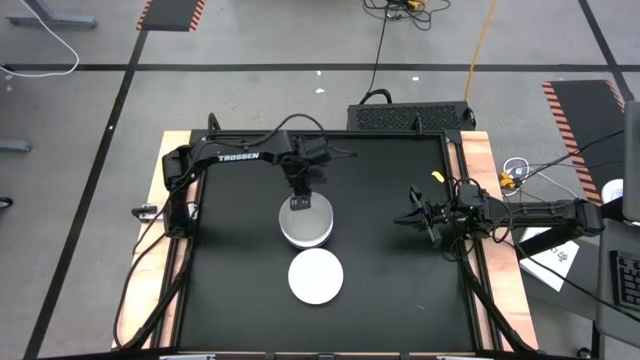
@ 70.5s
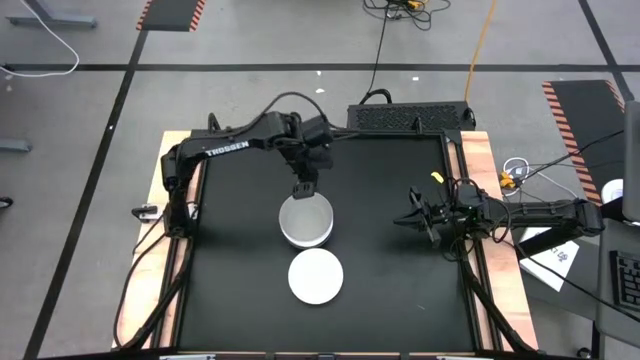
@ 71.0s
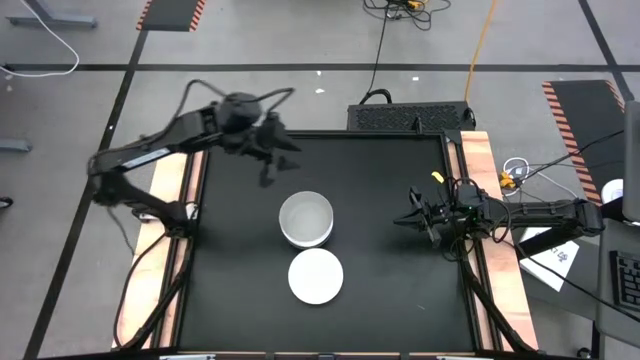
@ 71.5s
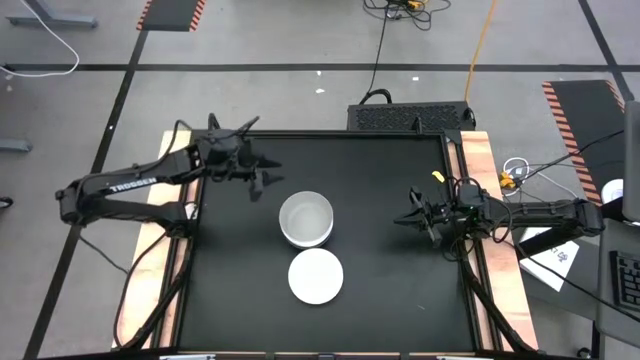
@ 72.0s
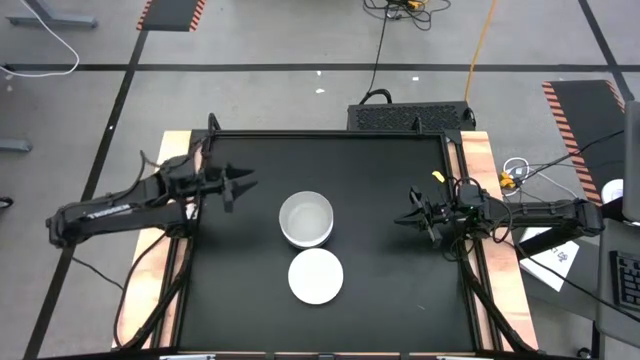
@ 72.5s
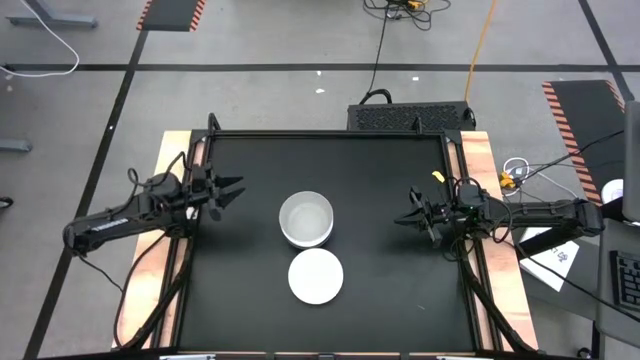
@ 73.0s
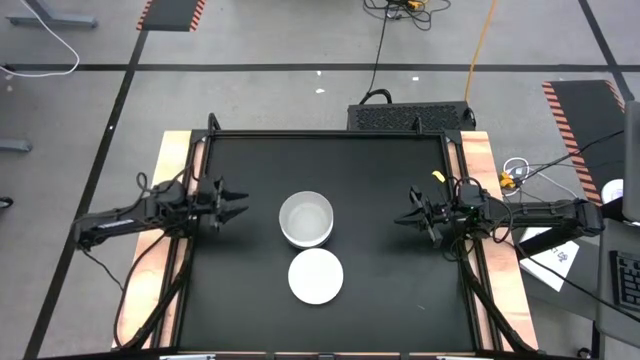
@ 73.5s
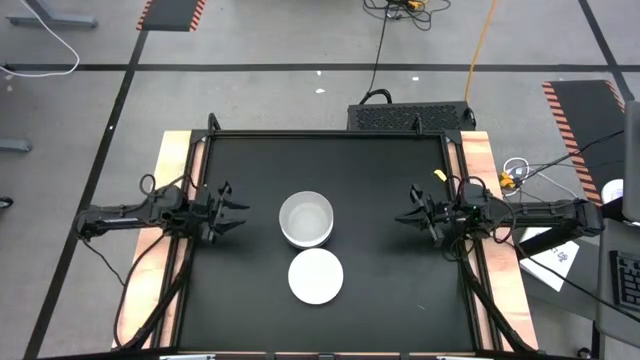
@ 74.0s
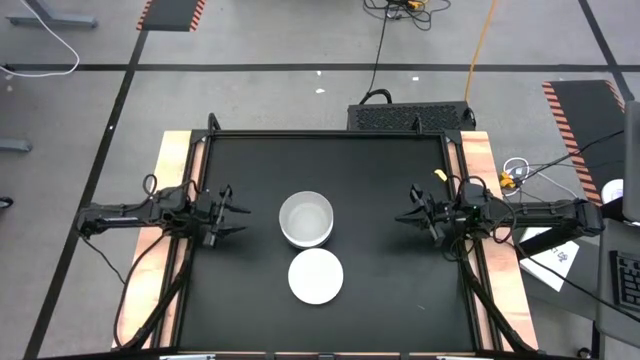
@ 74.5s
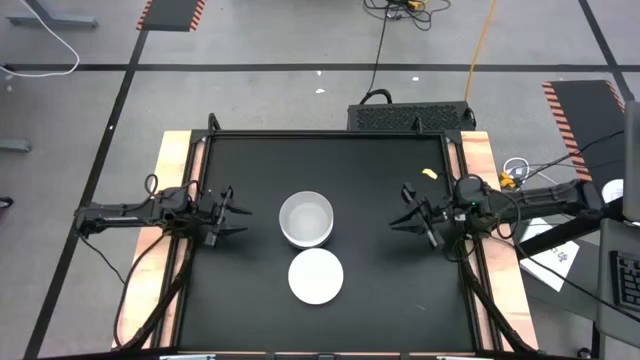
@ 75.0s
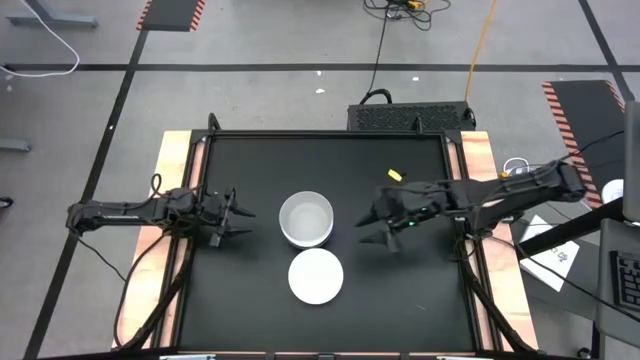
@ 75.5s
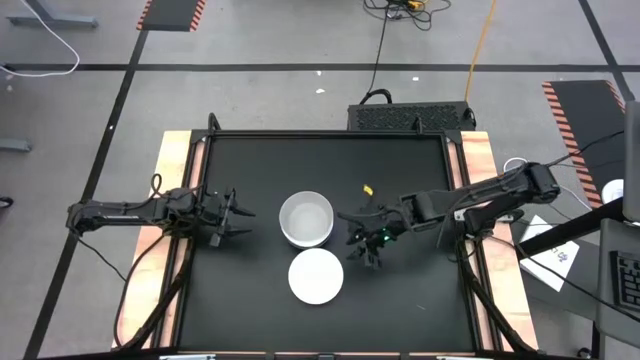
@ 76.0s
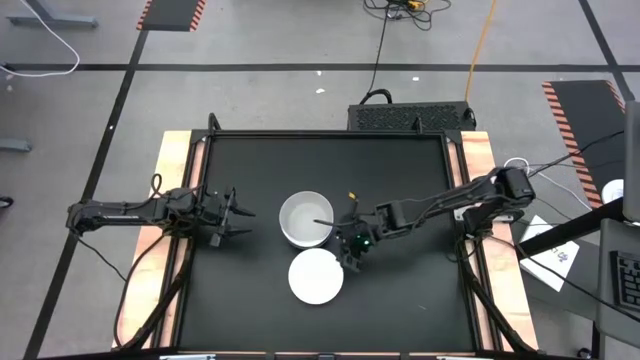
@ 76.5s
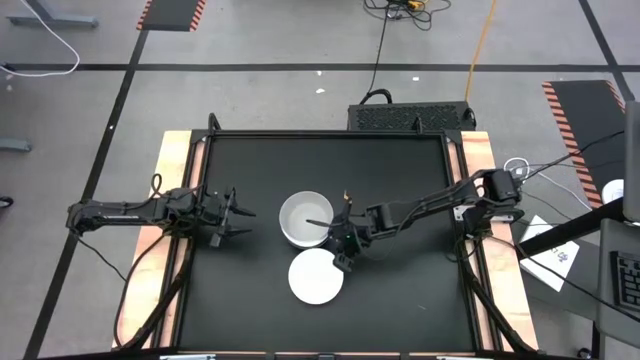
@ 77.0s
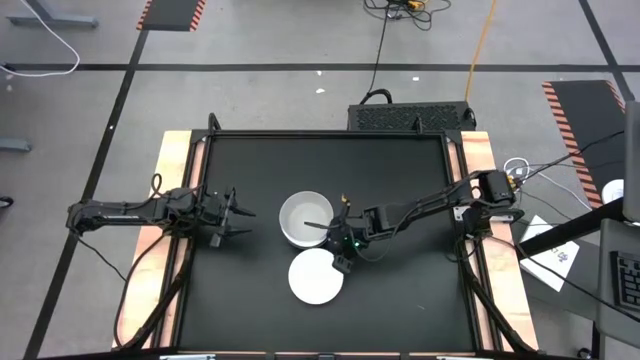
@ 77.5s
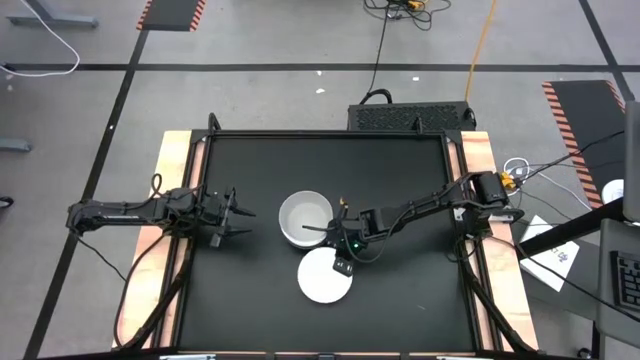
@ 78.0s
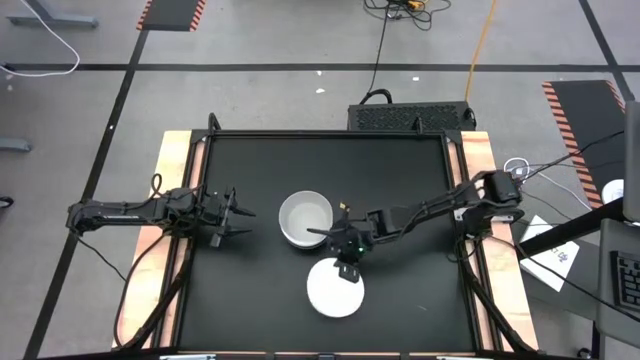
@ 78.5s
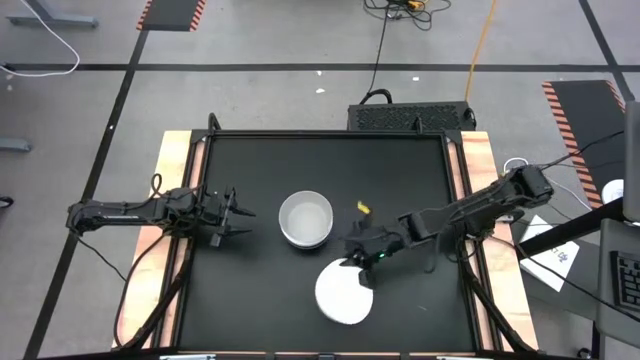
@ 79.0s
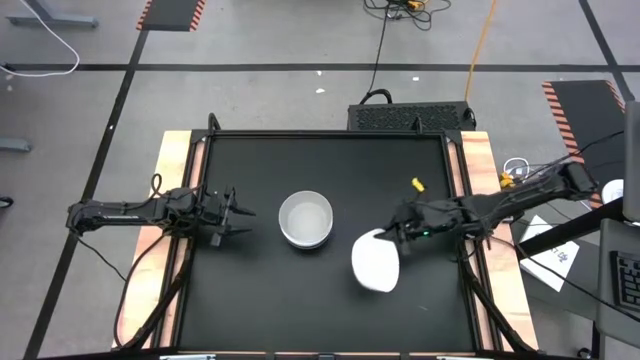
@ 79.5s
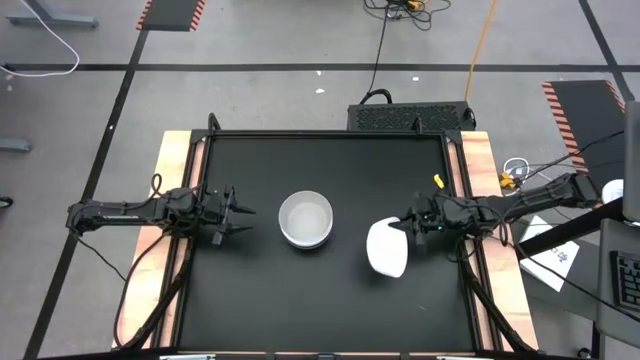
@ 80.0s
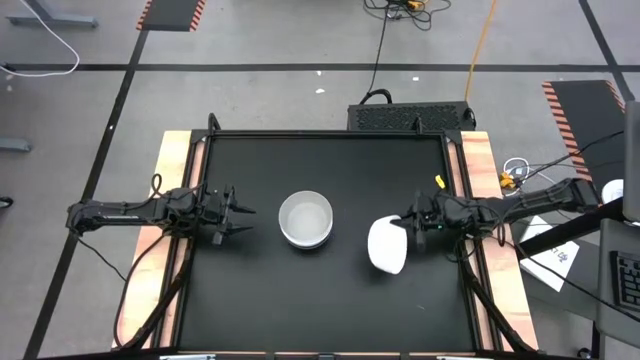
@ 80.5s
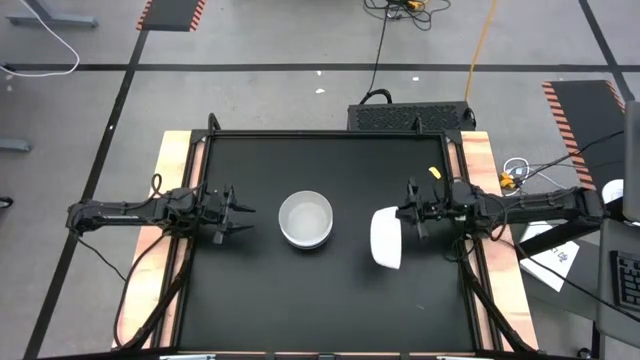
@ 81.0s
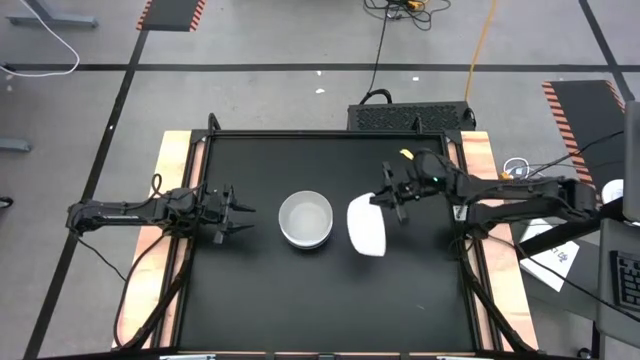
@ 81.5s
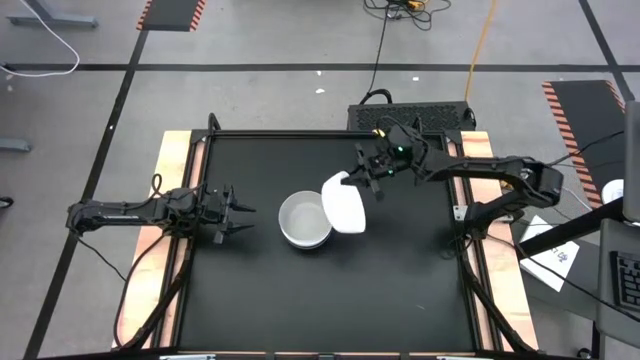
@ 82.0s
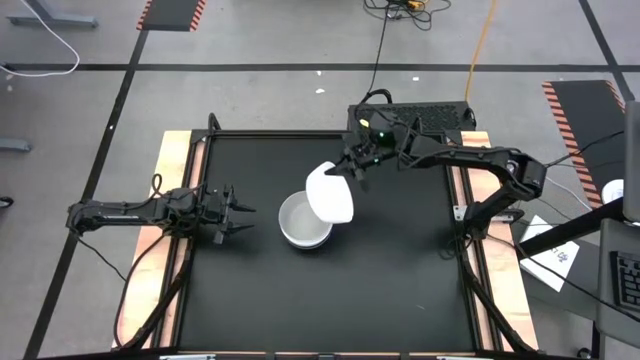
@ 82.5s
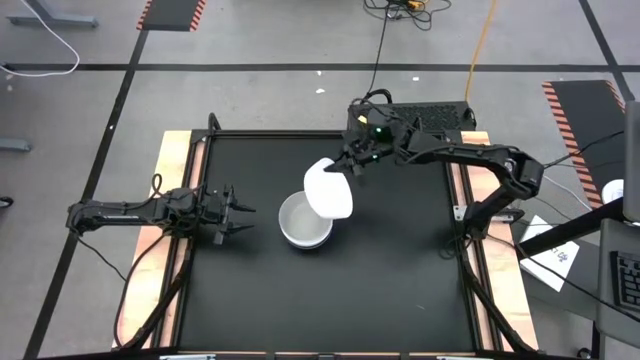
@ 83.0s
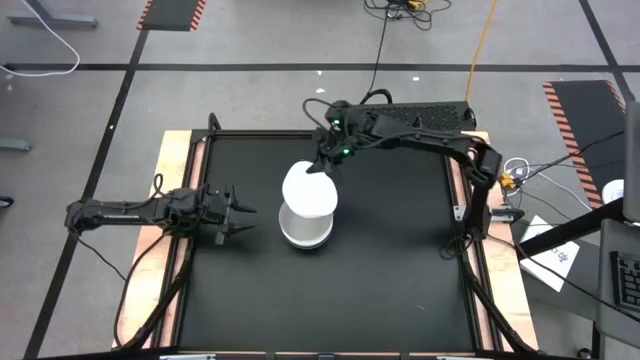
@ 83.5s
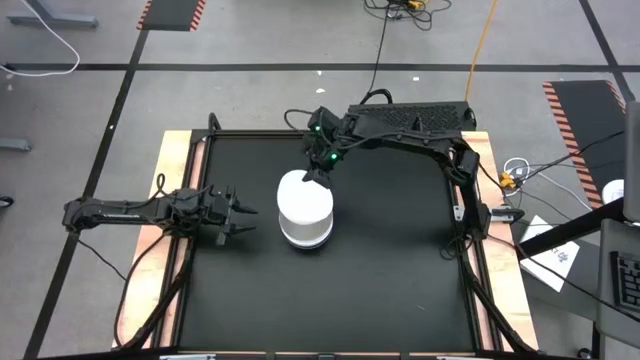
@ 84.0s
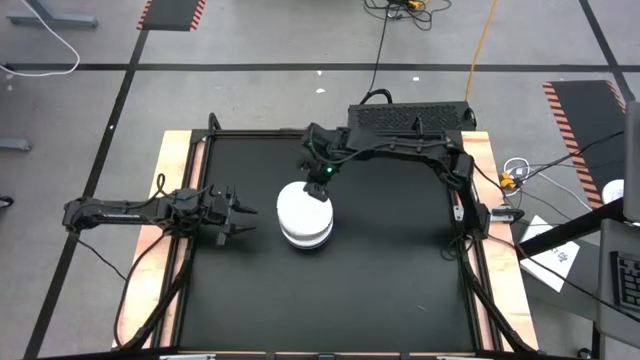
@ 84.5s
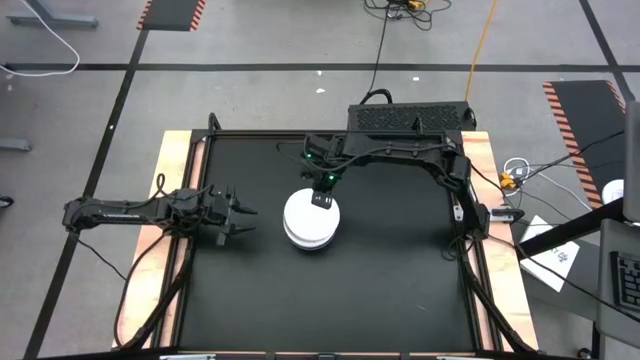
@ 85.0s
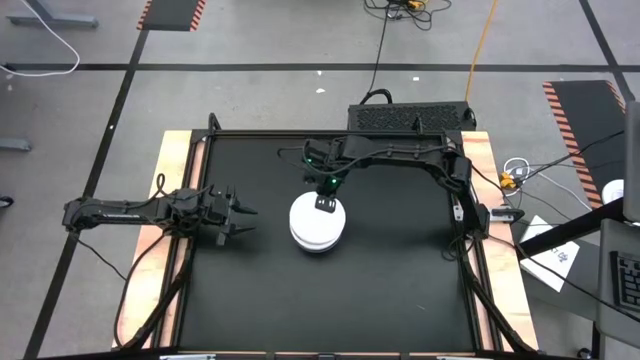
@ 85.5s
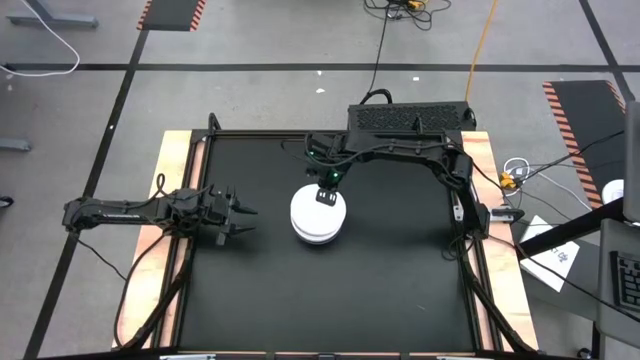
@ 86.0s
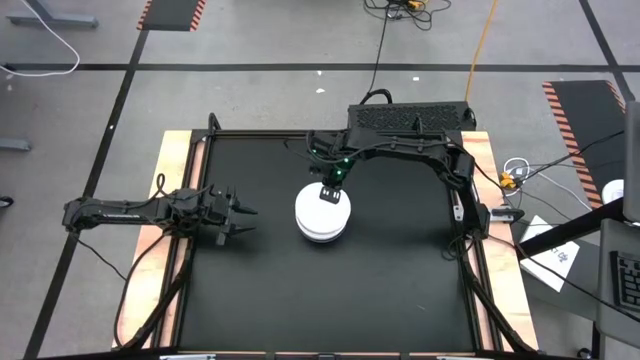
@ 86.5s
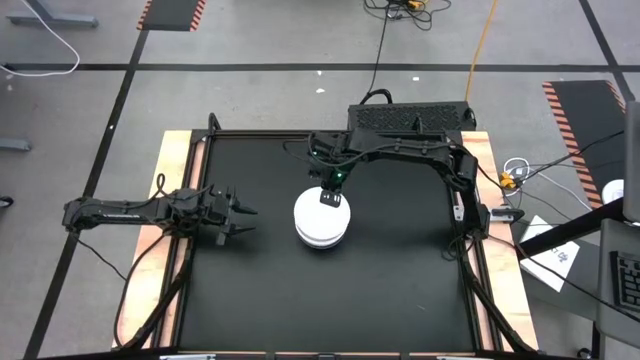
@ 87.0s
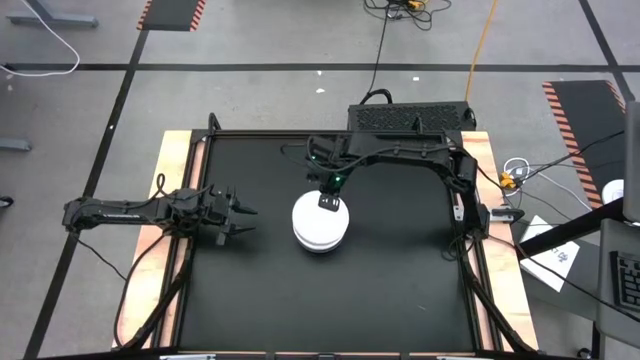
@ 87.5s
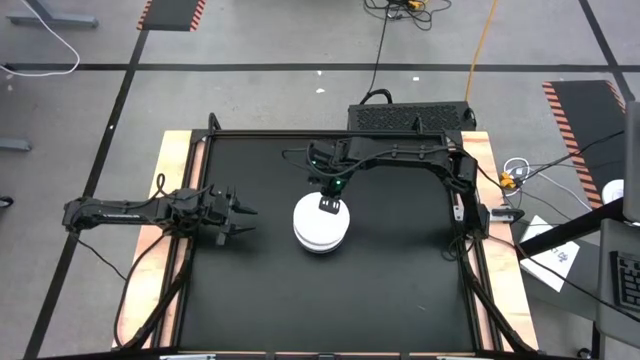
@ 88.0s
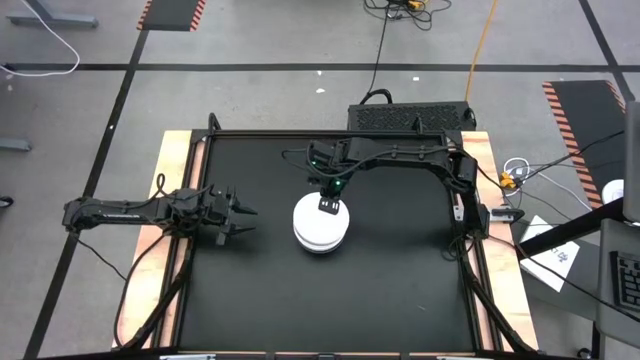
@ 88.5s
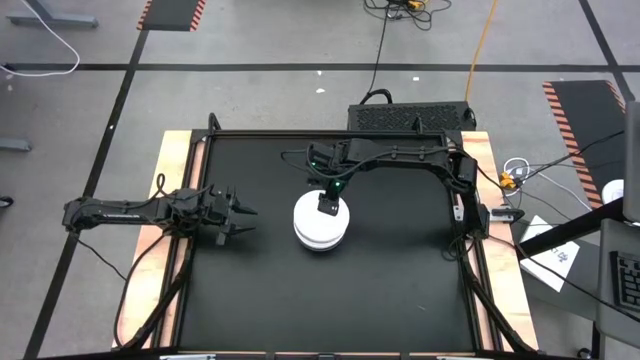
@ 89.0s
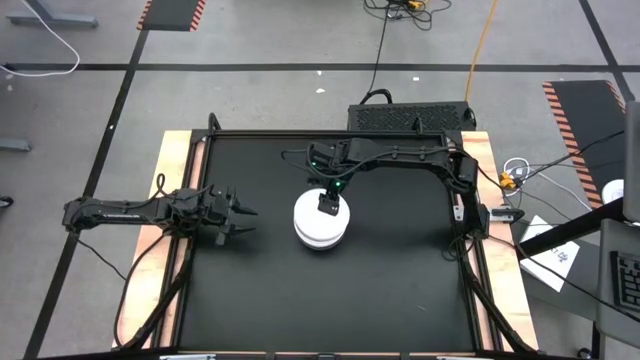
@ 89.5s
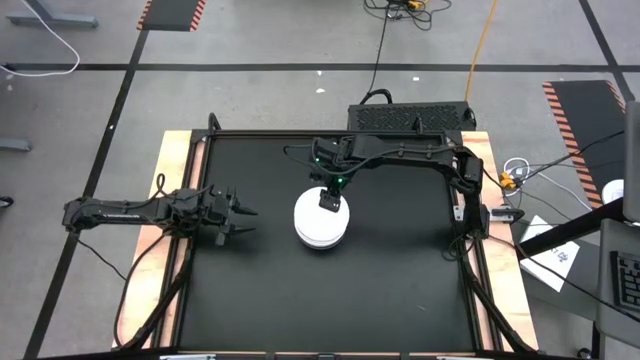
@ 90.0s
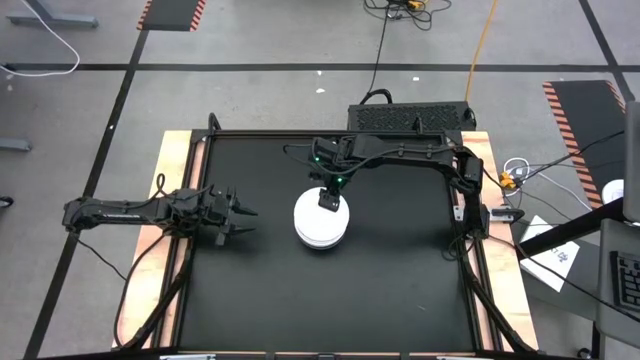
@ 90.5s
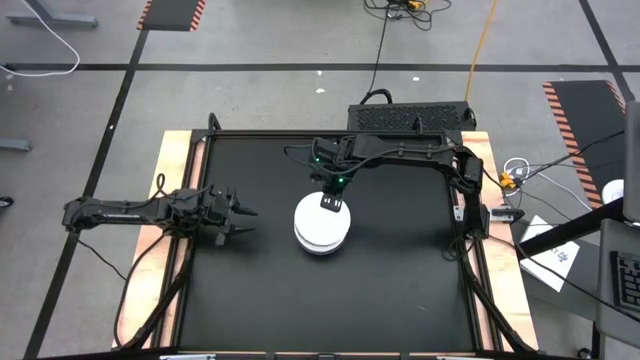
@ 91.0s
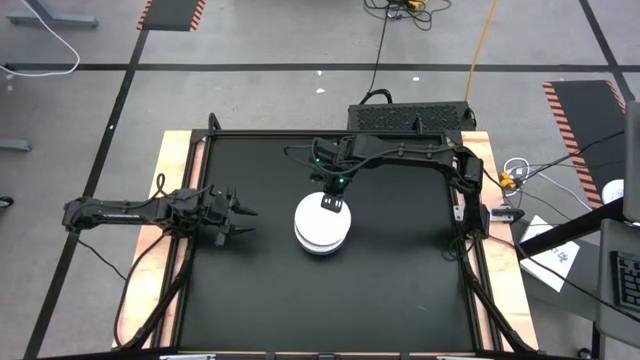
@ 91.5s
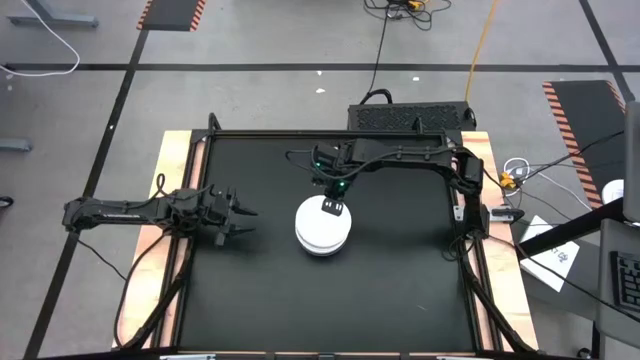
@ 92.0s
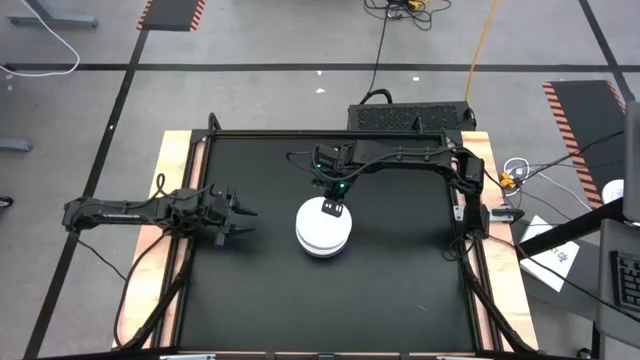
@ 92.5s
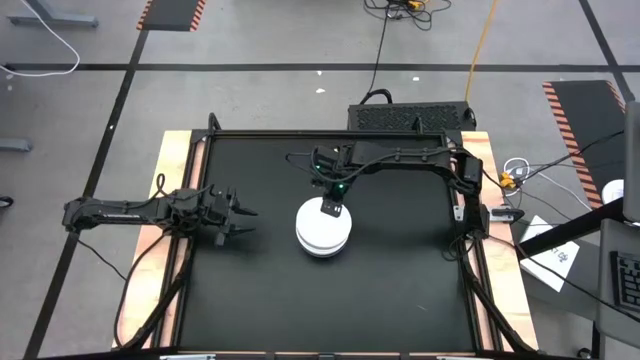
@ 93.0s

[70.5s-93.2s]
Task: Nest bowls inside each other
Stack the white bowl on the gray bowl
